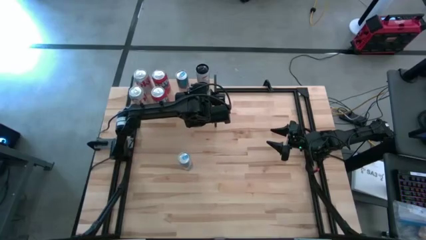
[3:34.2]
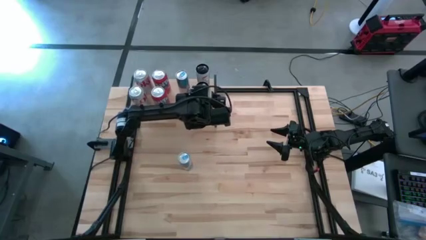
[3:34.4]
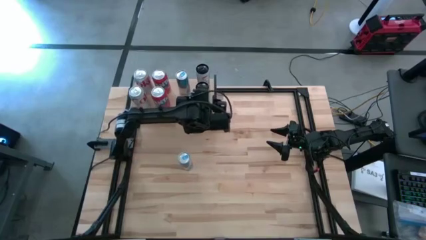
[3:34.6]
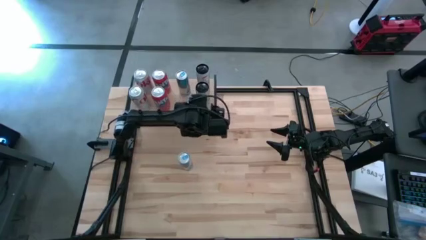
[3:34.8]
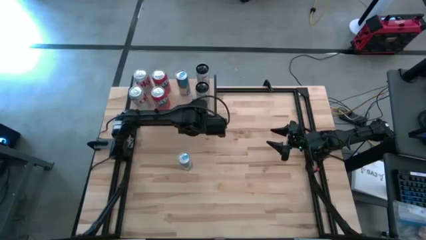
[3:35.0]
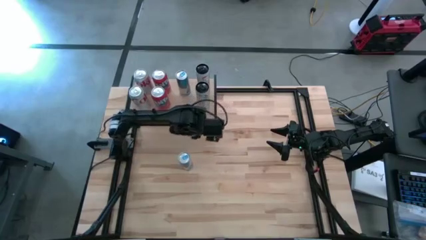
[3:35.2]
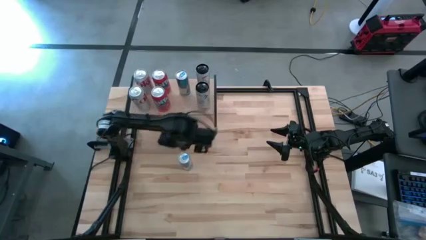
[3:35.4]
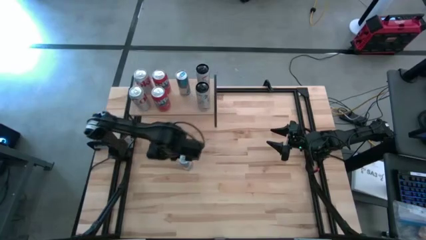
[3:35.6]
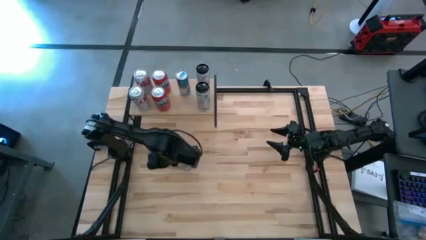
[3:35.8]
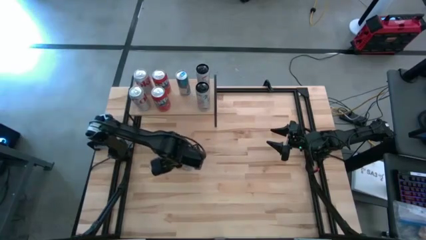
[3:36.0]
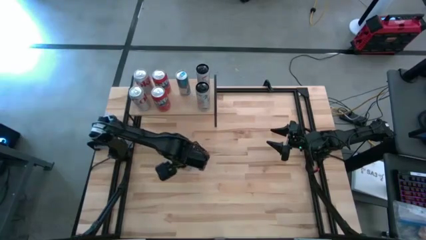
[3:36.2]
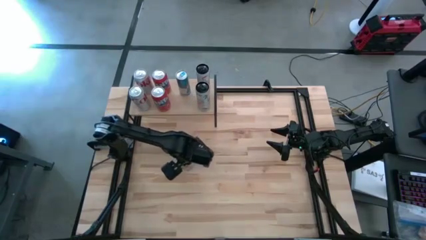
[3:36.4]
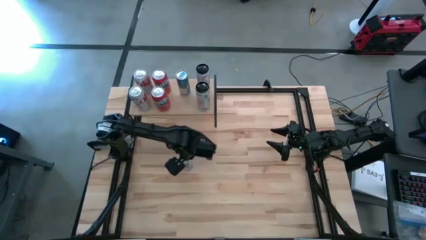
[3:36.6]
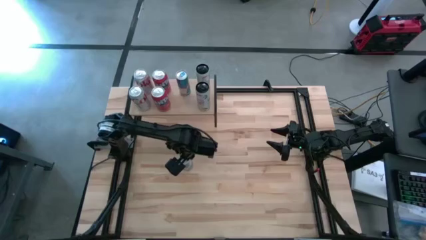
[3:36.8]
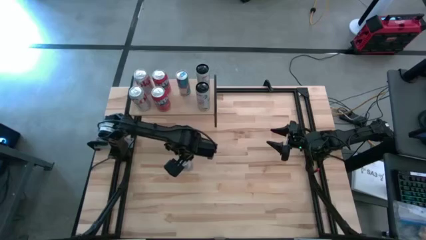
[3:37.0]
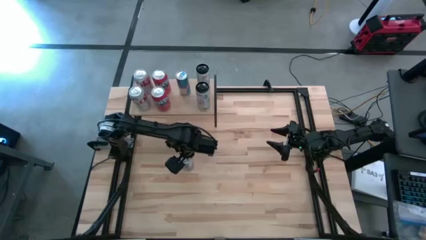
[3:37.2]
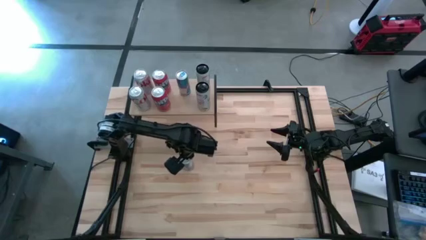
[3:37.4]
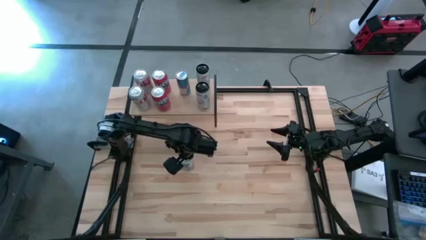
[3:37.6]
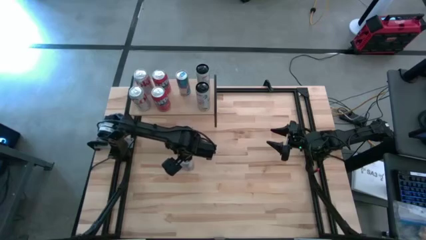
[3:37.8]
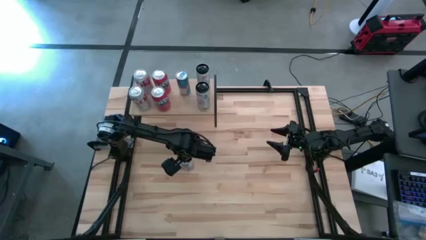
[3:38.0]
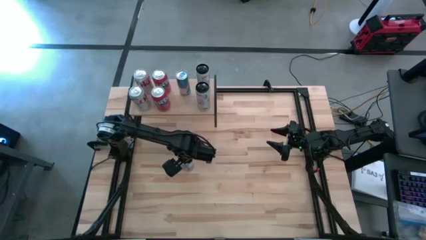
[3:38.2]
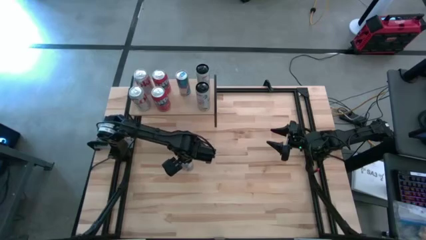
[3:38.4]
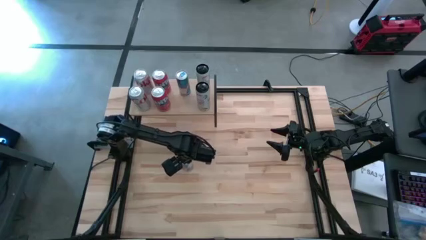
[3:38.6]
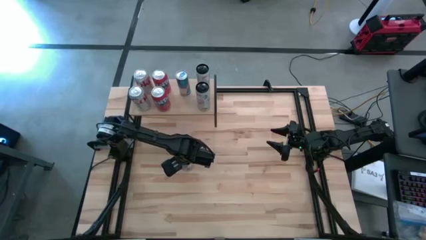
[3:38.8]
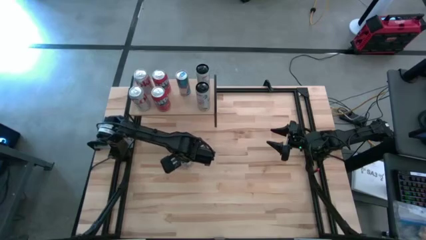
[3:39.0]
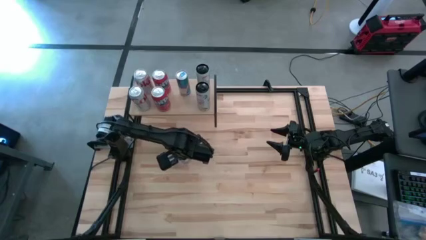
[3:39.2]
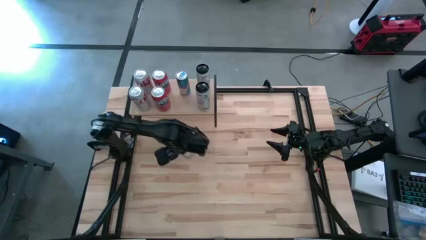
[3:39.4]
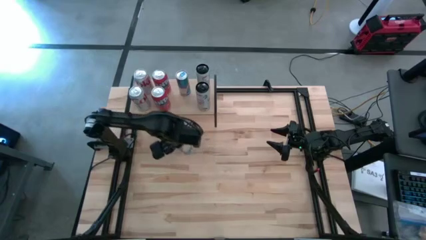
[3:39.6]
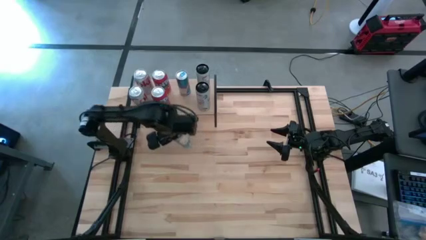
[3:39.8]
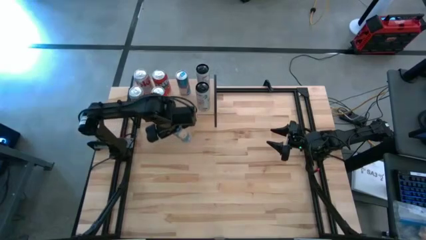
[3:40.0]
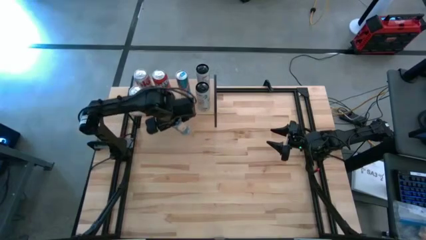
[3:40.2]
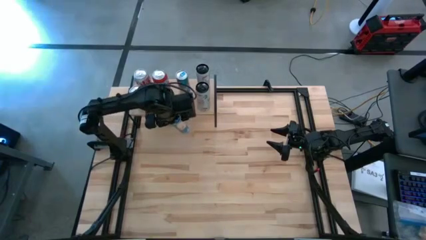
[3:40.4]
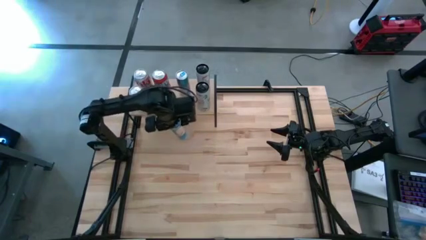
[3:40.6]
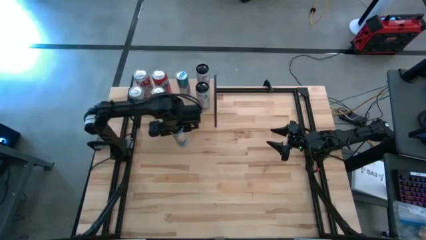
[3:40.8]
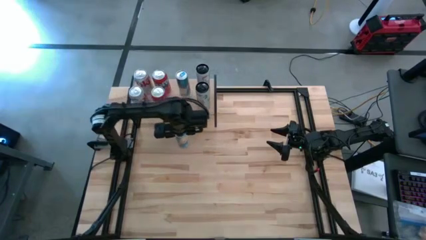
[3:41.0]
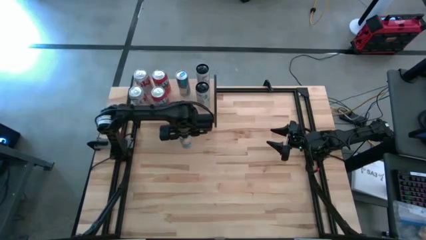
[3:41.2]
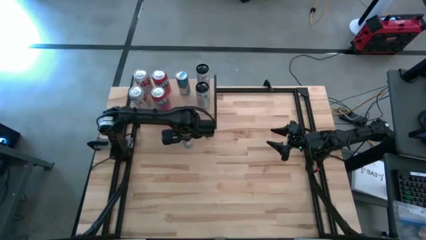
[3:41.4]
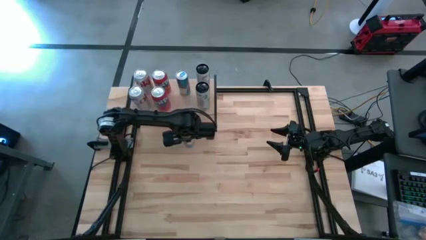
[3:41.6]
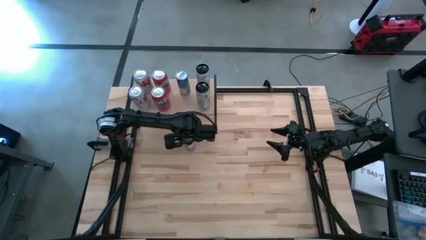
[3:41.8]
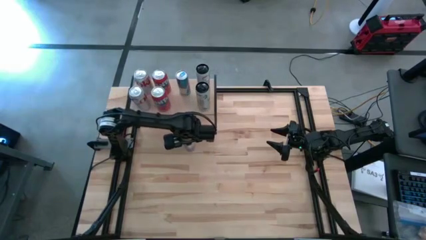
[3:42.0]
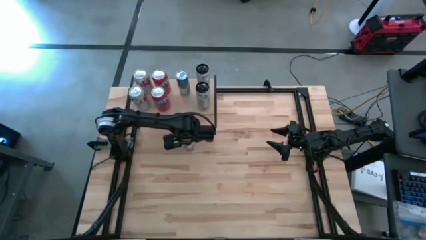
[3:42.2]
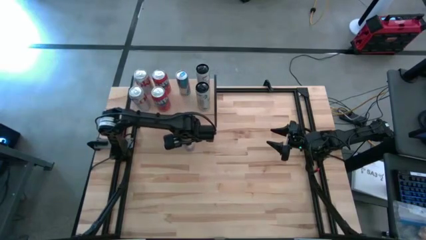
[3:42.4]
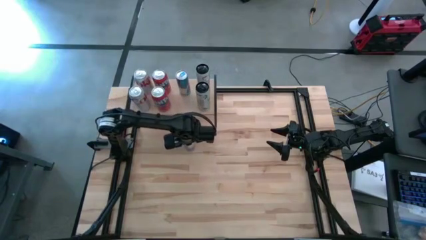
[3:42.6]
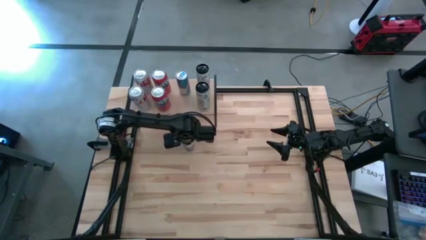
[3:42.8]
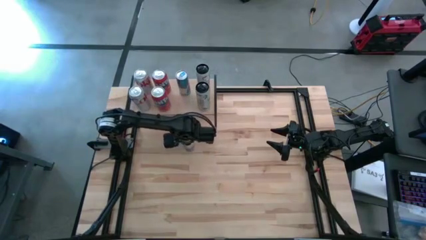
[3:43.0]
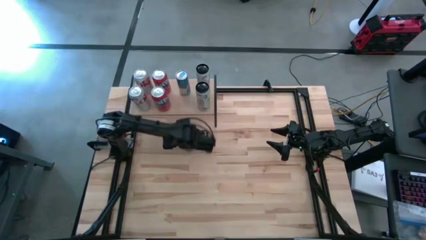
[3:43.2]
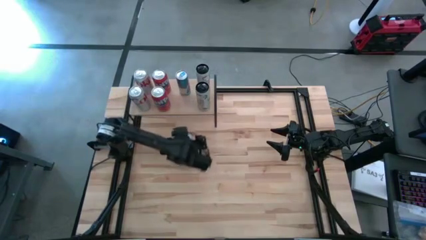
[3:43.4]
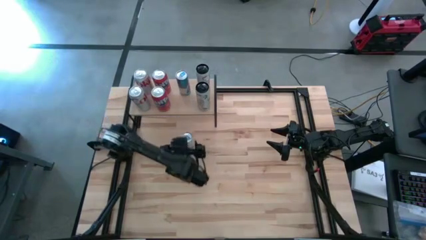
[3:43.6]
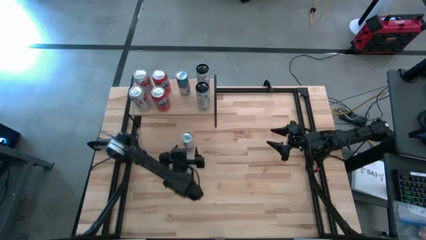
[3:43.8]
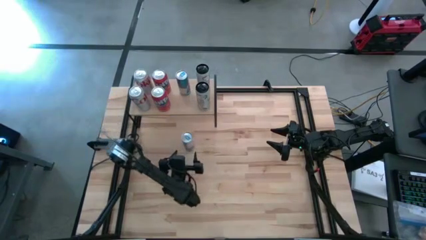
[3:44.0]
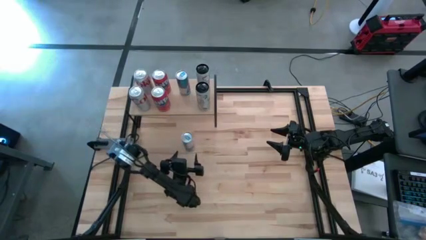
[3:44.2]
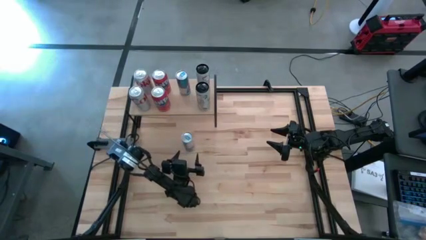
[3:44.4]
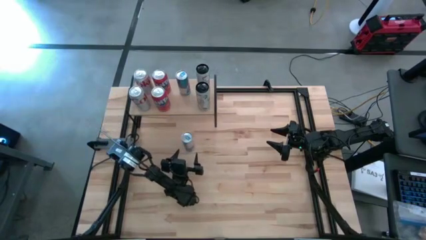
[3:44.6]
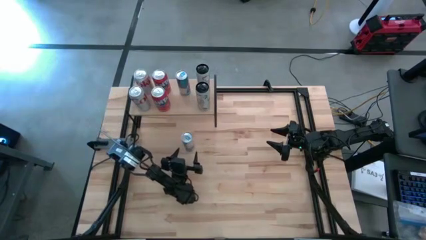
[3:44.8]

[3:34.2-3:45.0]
Task: Place canned beverage on shelf
Put the blue soda can and align the with the other blue soda can on the shelf

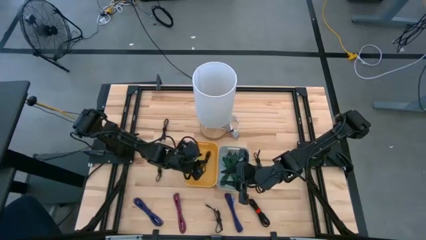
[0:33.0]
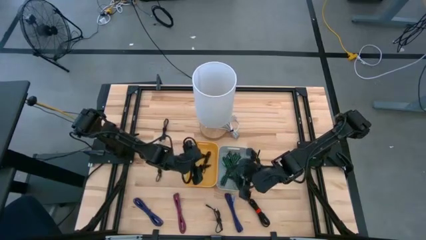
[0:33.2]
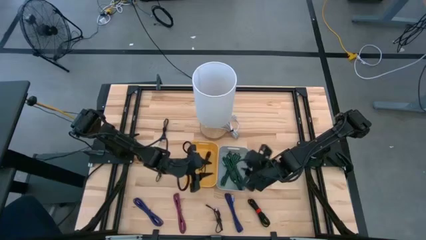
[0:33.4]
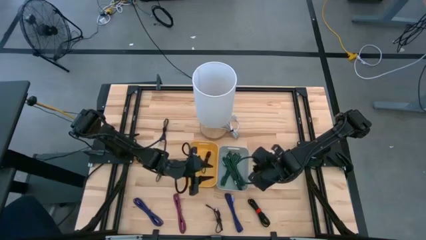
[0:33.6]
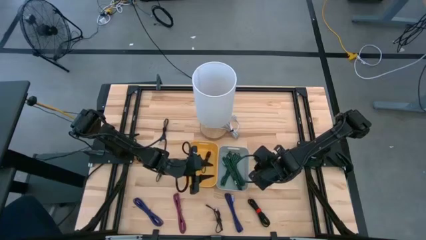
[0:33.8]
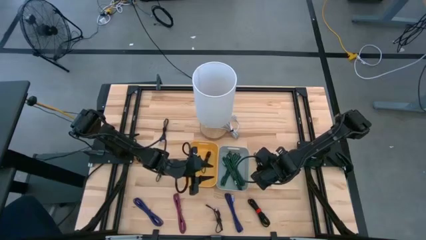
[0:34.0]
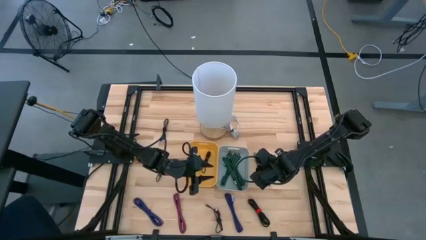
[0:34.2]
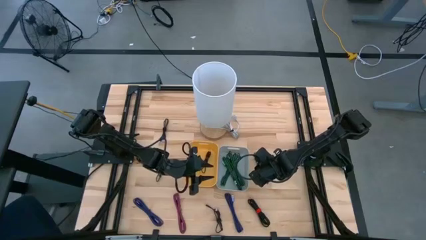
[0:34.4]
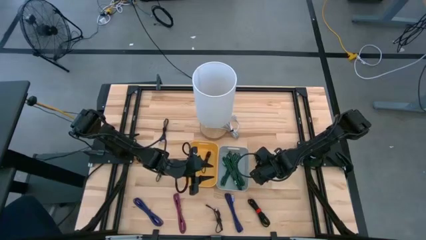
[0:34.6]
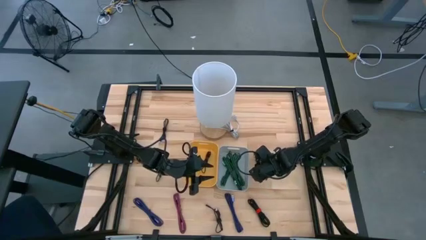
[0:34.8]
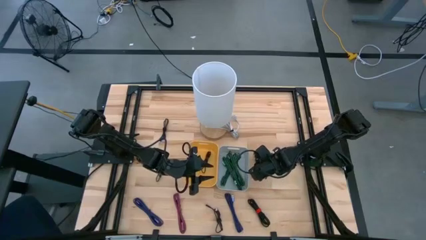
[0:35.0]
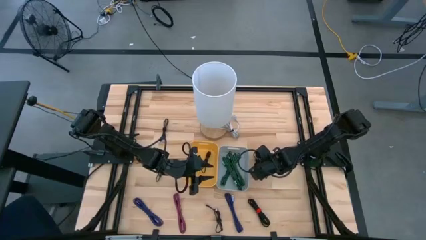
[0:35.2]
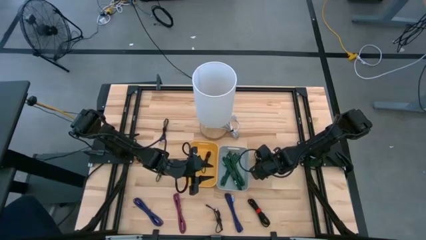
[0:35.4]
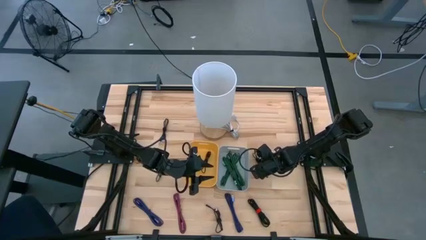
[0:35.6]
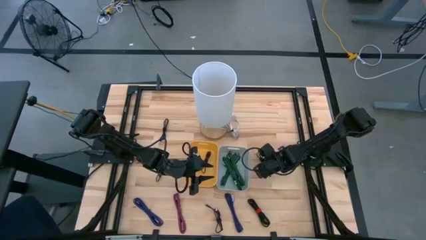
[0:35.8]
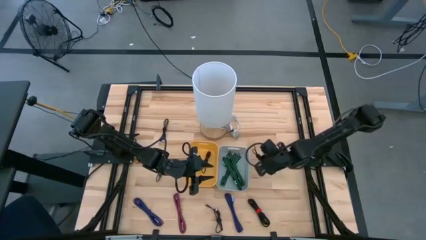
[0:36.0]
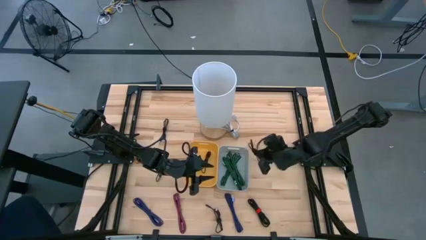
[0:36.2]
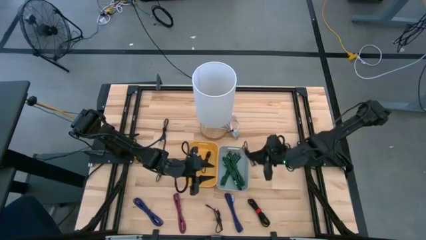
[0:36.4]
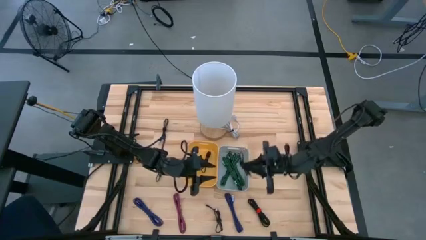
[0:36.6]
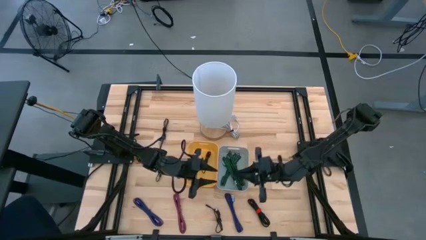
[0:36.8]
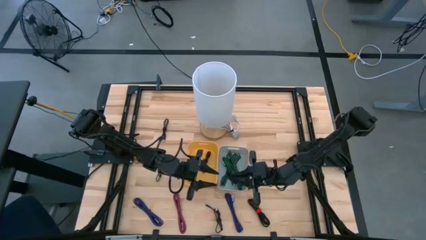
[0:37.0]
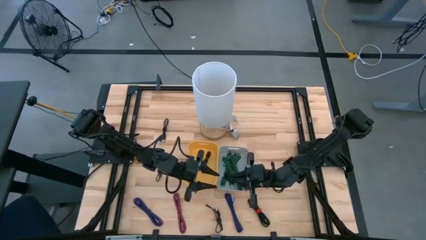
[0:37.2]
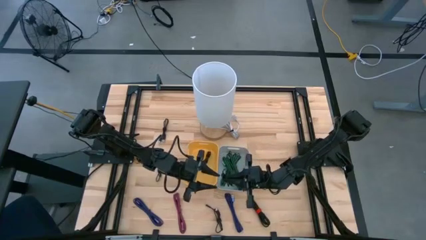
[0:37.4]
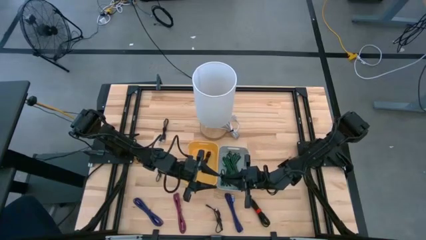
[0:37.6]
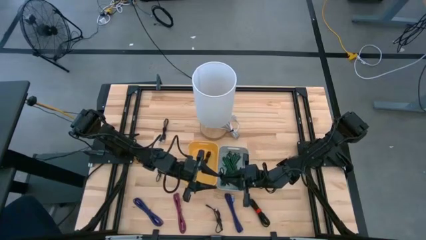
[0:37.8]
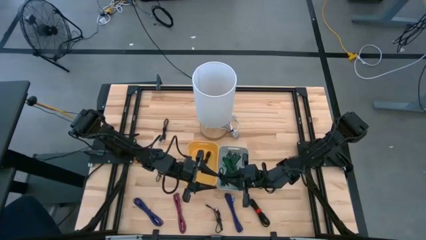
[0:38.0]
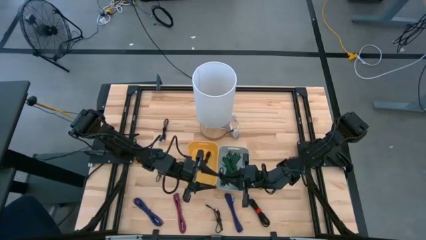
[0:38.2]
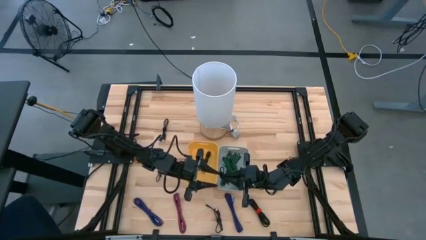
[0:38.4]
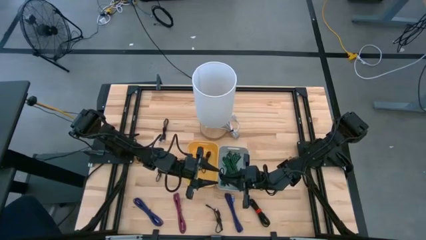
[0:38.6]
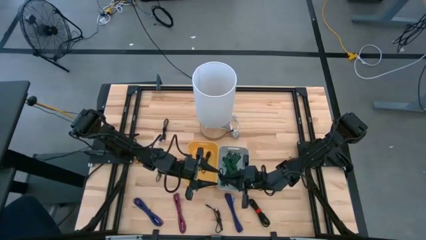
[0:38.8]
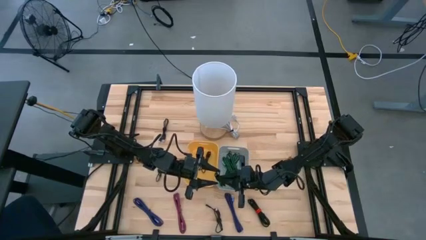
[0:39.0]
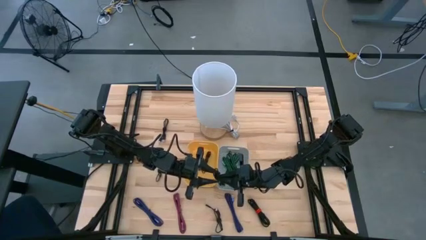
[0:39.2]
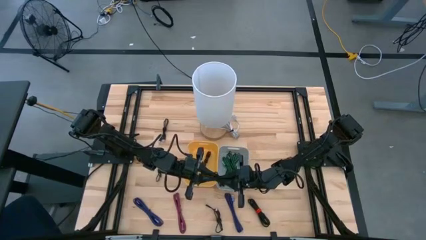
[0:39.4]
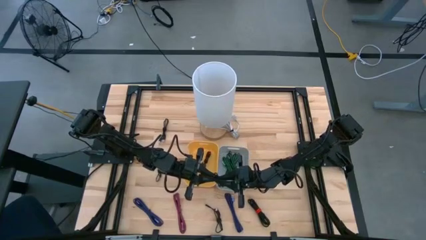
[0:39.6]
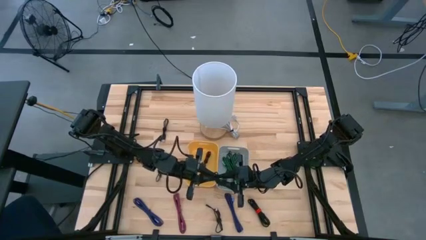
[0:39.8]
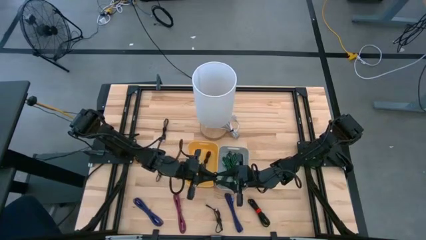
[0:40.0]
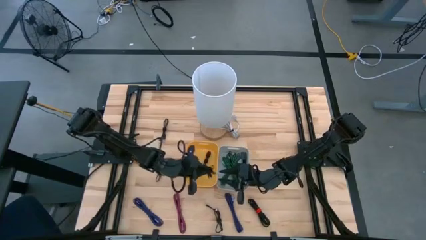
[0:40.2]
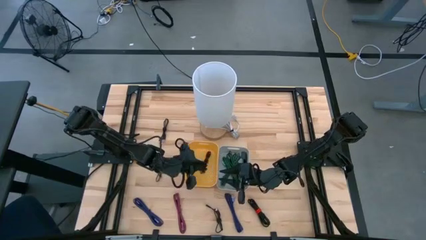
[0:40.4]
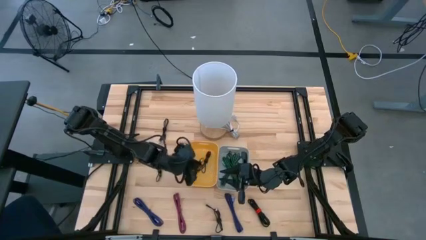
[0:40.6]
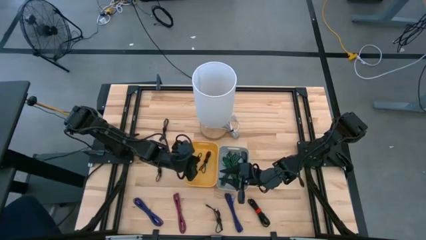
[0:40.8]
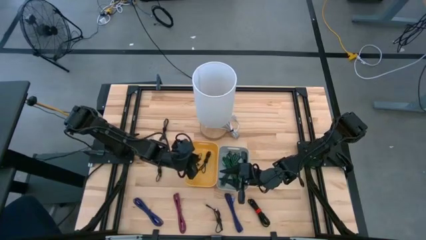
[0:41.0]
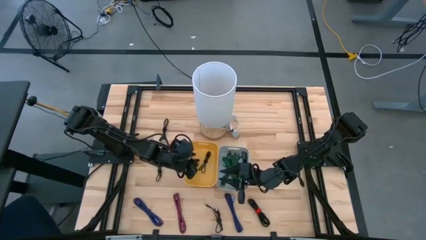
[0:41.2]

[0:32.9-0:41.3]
Task: Pick & Place USB Port
Put the black charger cable into the yellow bin
